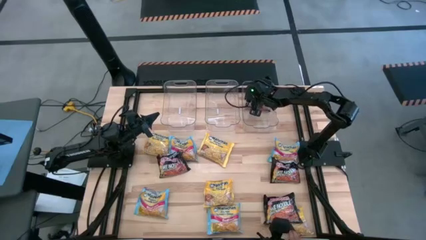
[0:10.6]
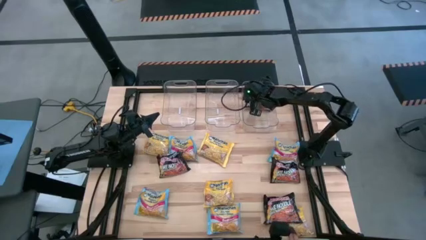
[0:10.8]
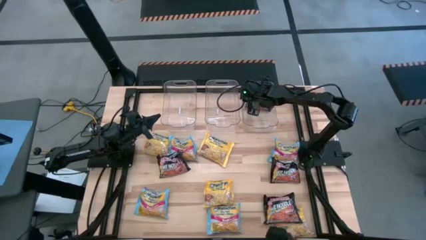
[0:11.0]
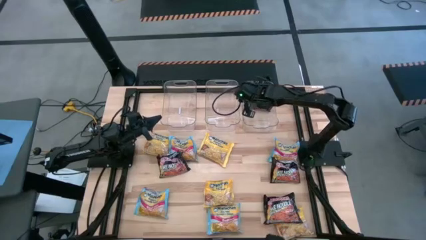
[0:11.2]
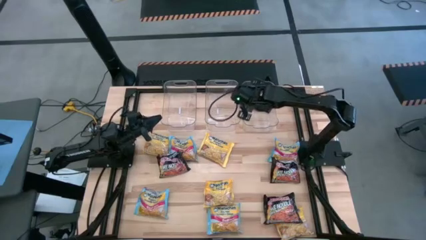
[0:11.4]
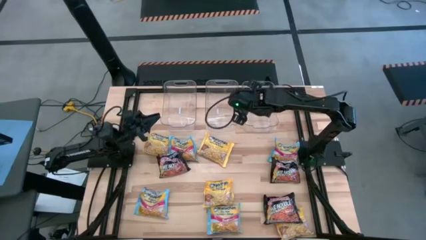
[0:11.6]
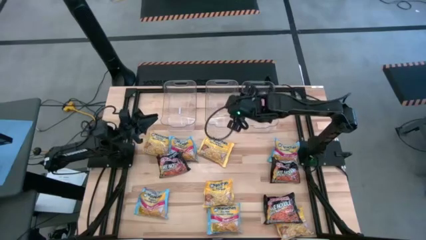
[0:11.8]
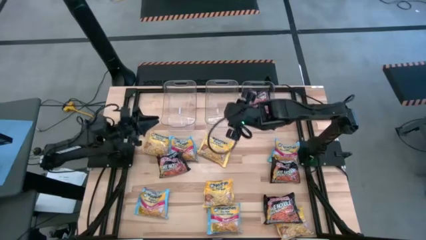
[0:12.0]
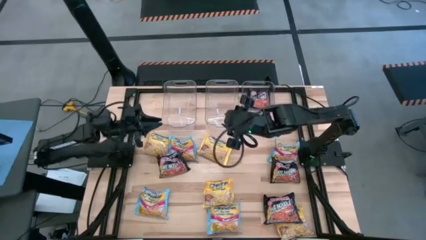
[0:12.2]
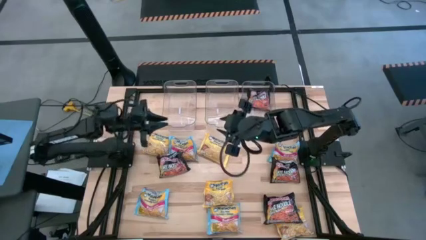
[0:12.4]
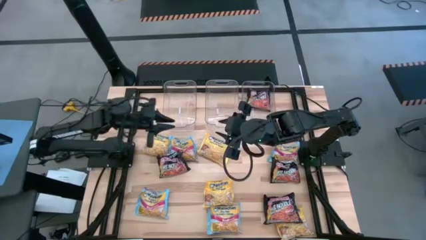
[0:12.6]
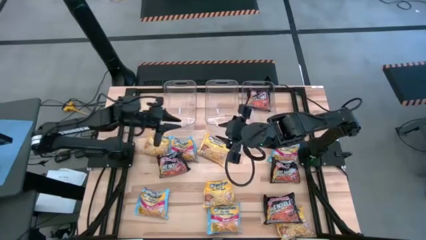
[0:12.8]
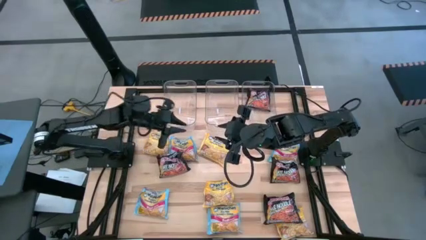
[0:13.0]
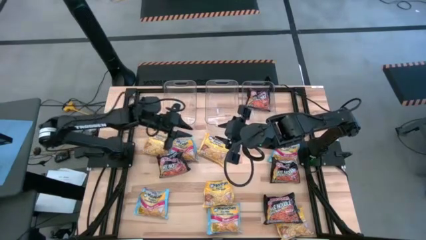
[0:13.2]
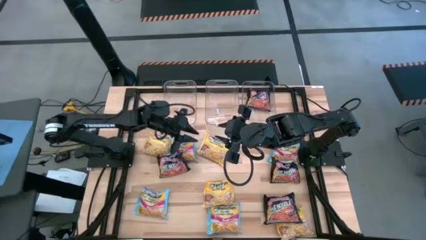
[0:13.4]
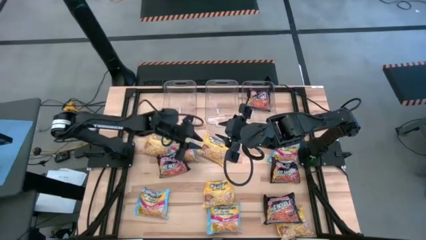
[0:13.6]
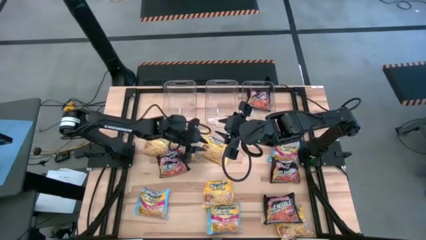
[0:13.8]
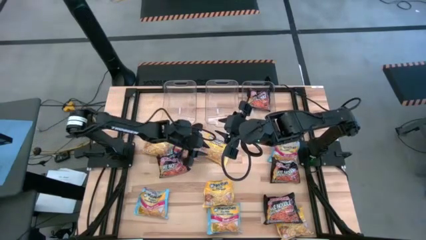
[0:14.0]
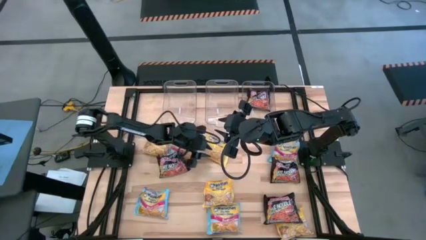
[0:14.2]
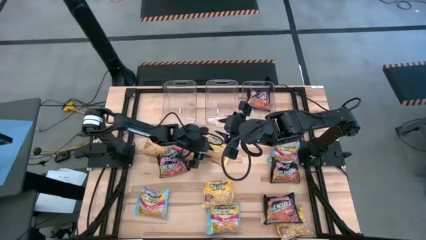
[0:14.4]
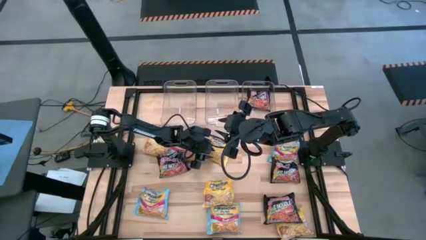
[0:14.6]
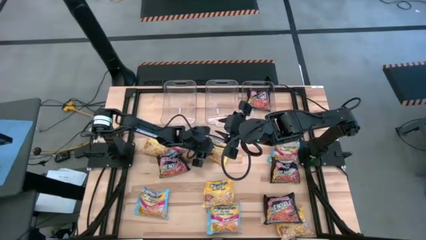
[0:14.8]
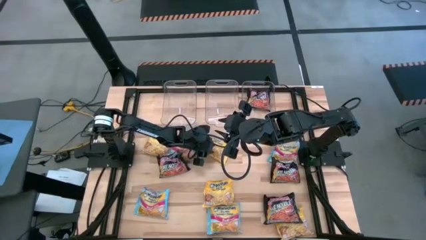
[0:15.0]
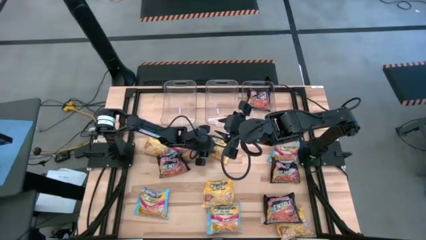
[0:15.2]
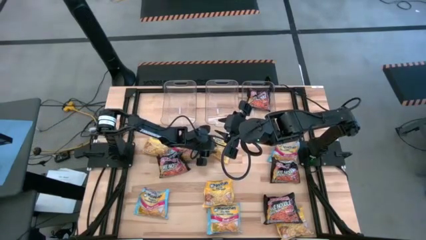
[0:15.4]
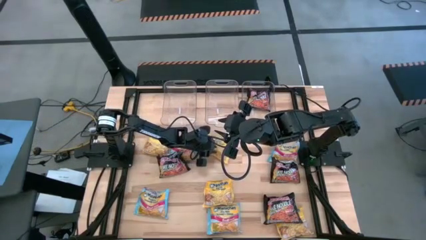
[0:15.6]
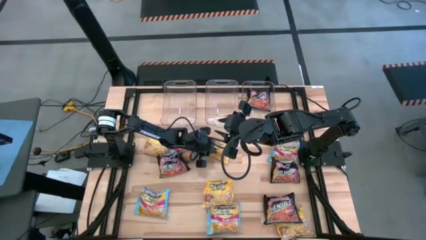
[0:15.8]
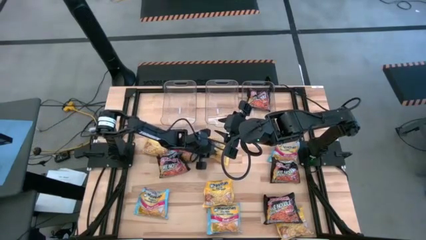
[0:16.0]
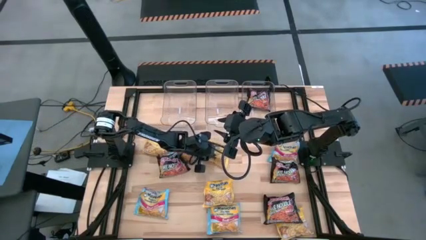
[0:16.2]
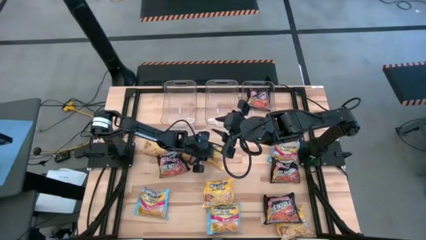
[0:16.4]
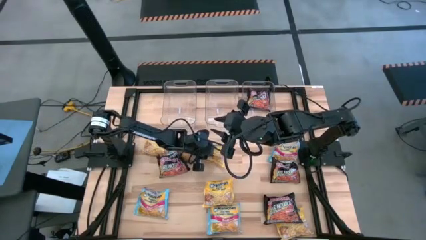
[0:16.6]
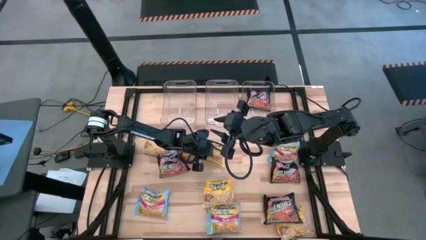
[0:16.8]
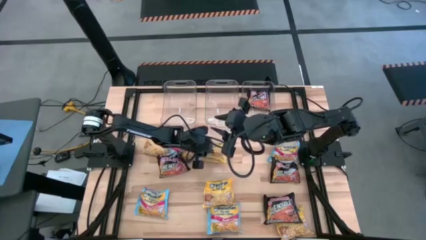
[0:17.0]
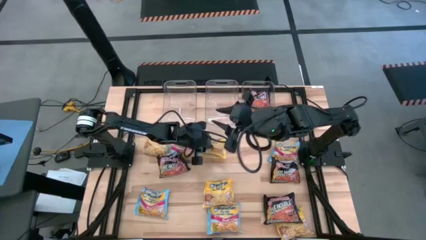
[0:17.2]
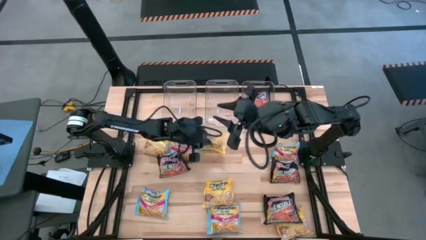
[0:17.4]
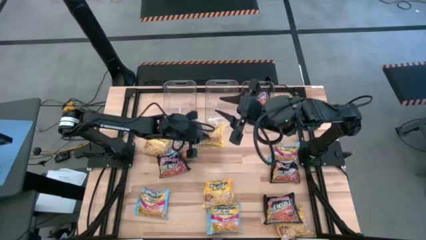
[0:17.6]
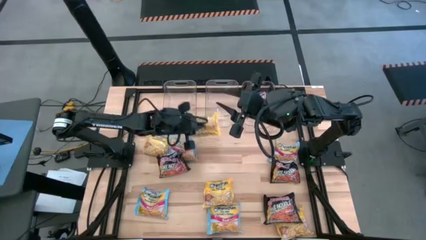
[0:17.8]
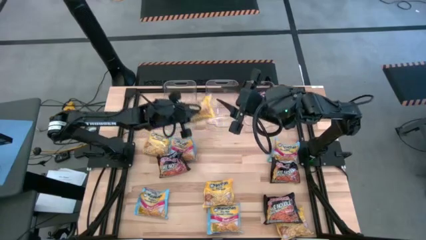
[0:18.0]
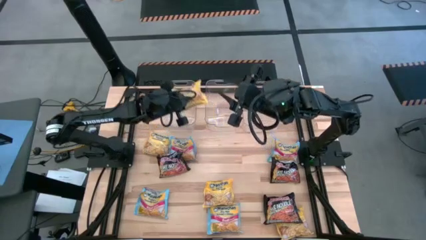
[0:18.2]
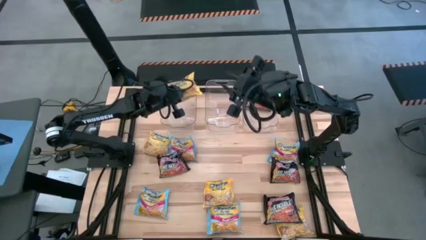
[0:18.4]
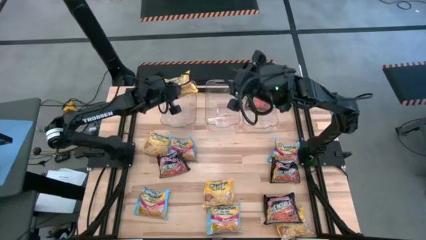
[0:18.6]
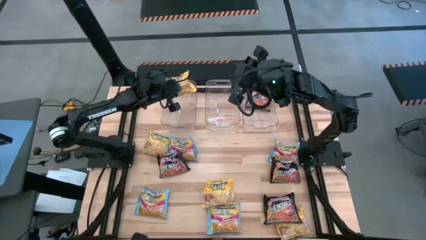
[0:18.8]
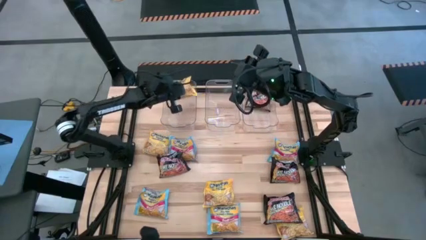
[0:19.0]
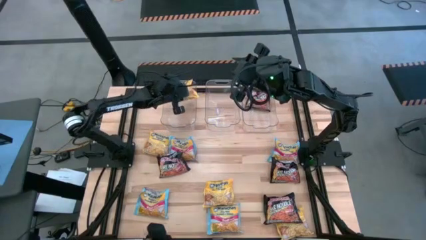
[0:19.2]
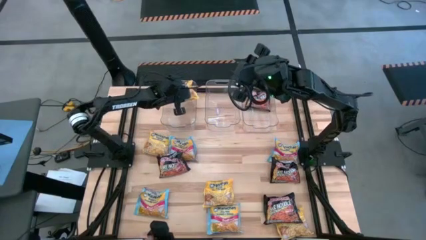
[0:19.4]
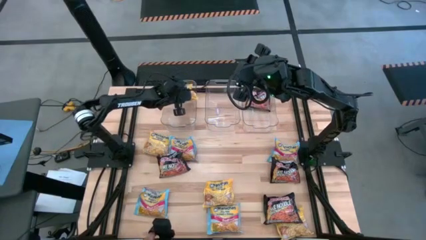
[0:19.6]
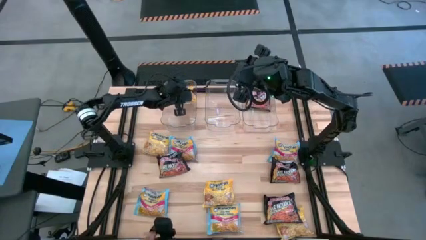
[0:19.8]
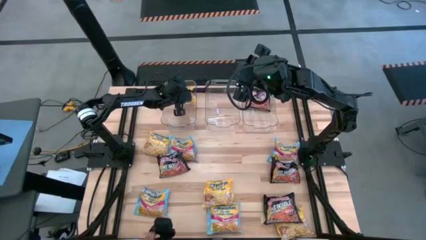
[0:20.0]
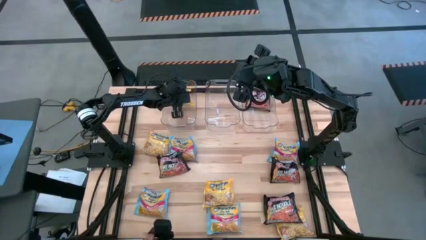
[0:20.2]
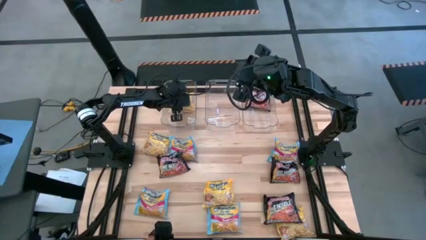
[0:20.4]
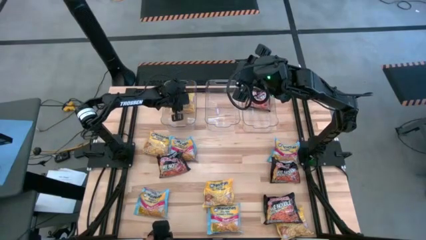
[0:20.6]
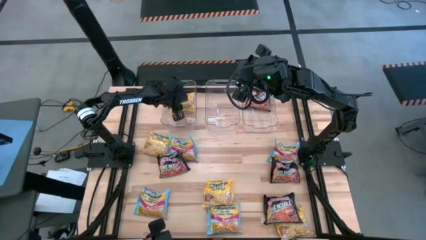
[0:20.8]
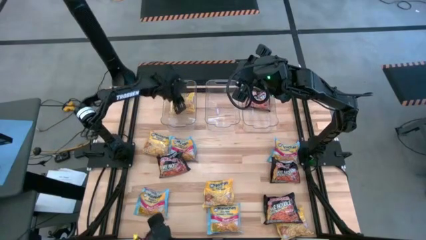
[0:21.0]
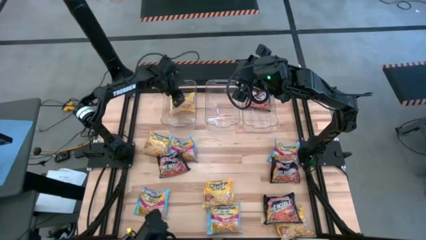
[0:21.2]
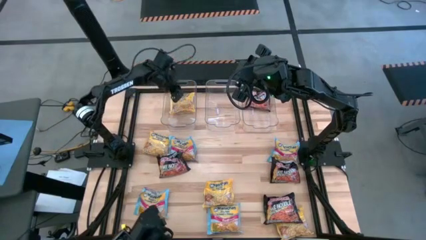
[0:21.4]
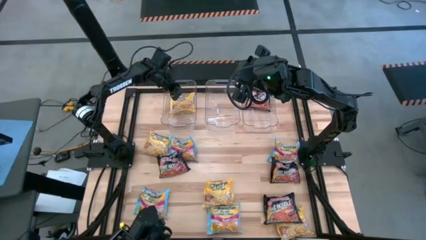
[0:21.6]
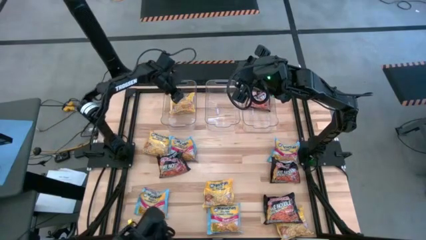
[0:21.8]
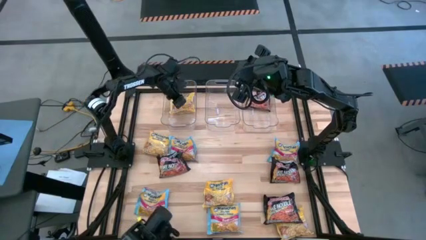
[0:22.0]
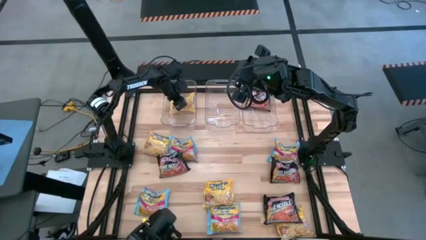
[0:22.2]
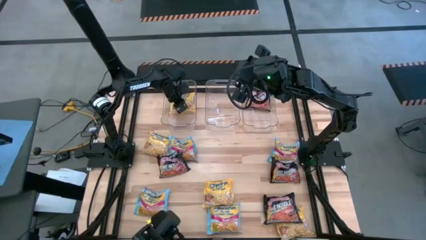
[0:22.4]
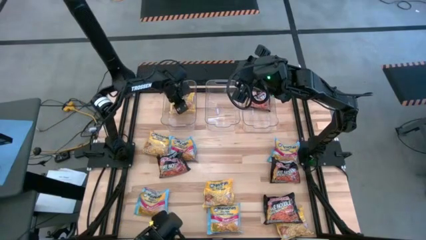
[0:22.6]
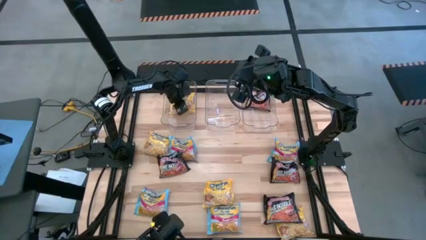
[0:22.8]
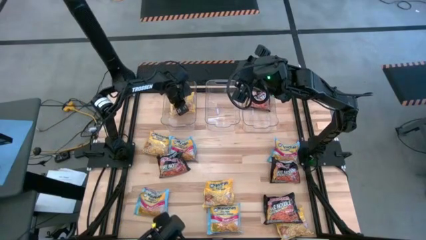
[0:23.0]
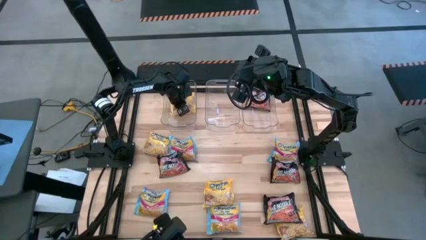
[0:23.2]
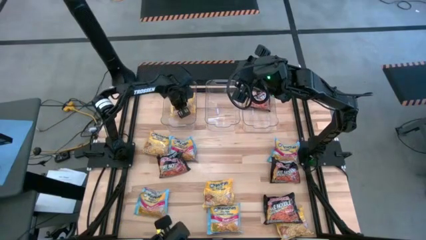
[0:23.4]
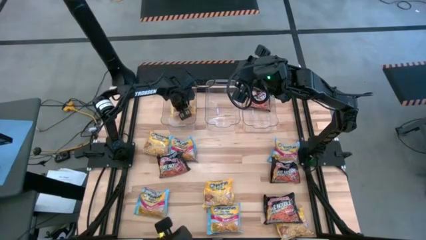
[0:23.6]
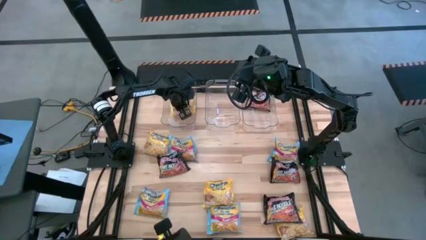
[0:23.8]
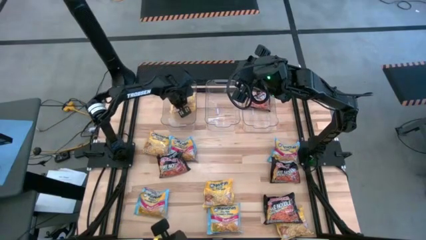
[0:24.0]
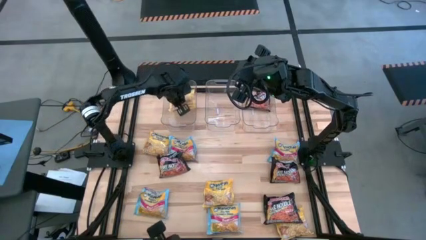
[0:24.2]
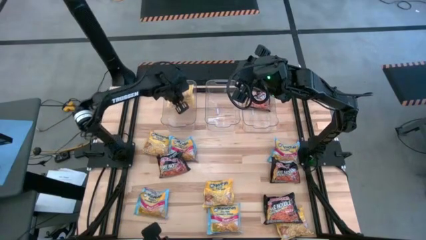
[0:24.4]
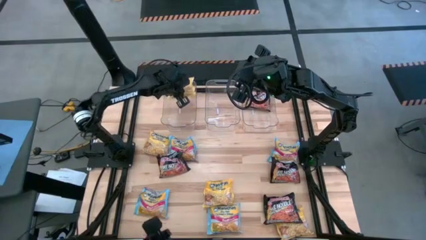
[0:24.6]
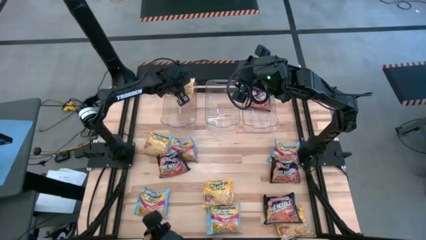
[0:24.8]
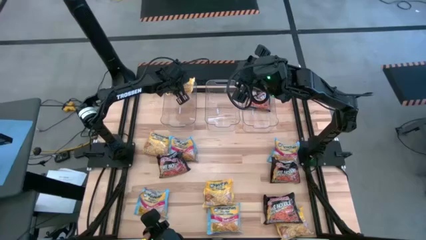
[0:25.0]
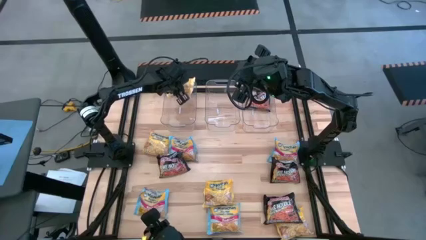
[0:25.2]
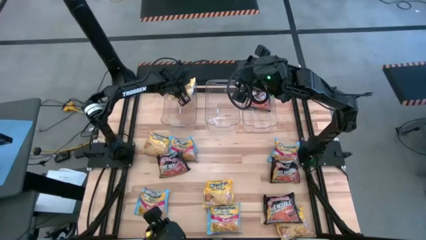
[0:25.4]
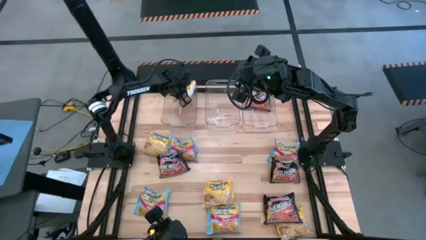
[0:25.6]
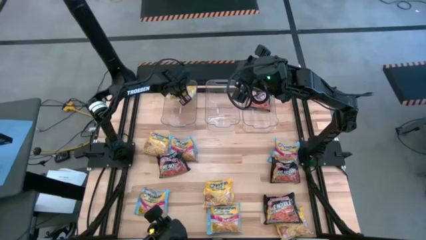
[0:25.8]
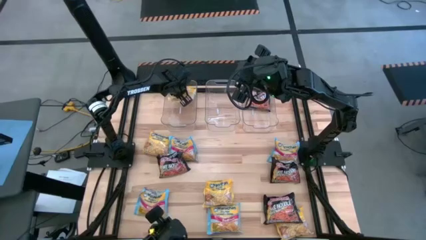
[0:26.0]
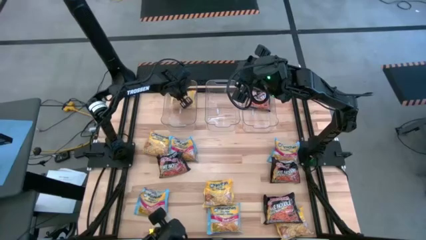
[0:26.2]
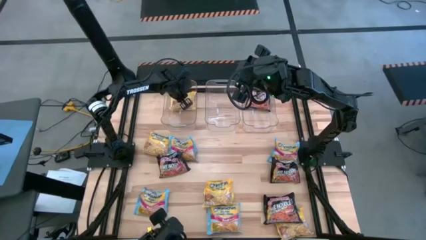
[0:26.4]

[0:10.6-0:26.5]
Task: Sort Maruchan noodles
Put the yellow noodle pack into the left transparent bin
